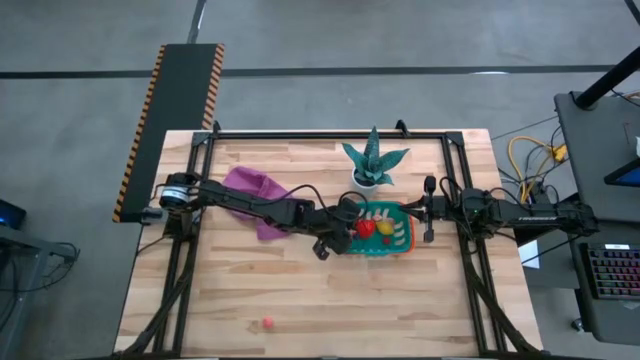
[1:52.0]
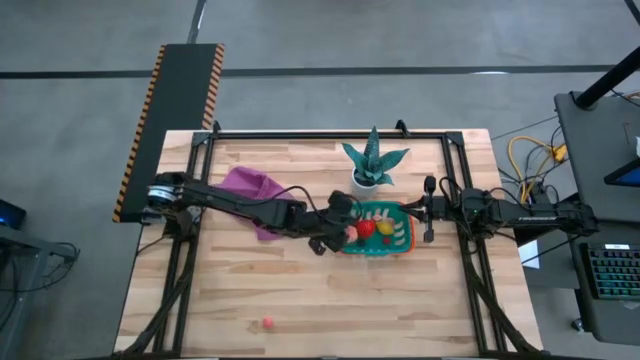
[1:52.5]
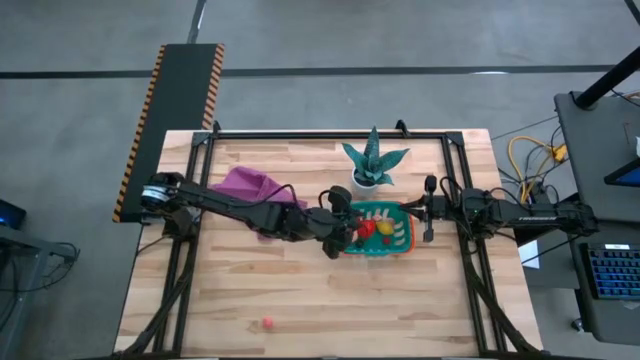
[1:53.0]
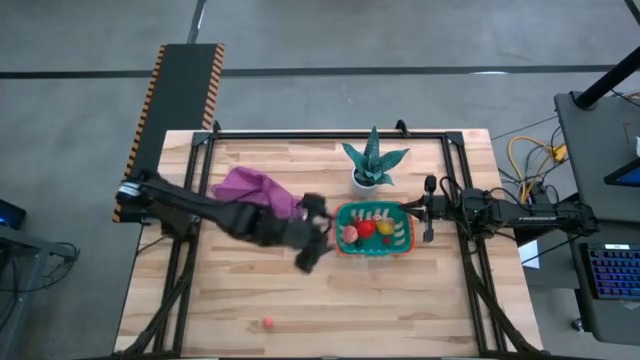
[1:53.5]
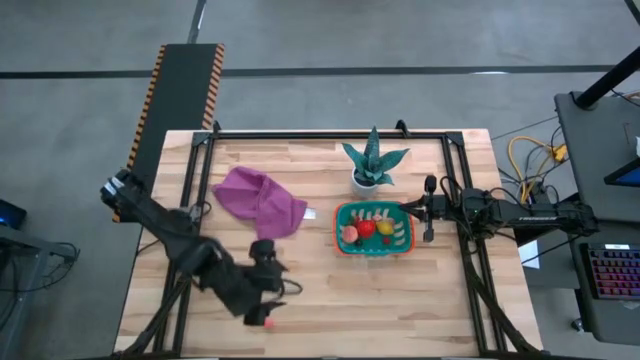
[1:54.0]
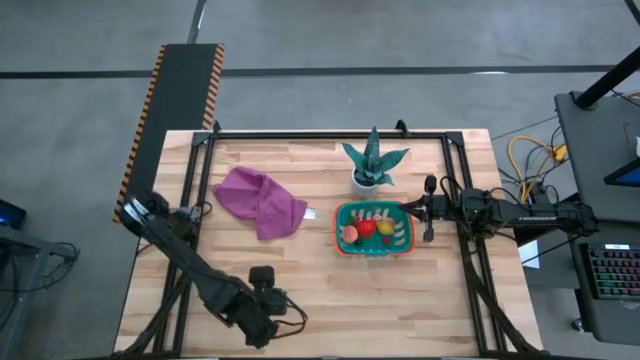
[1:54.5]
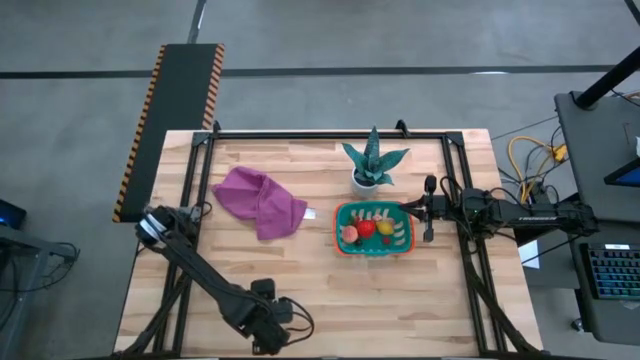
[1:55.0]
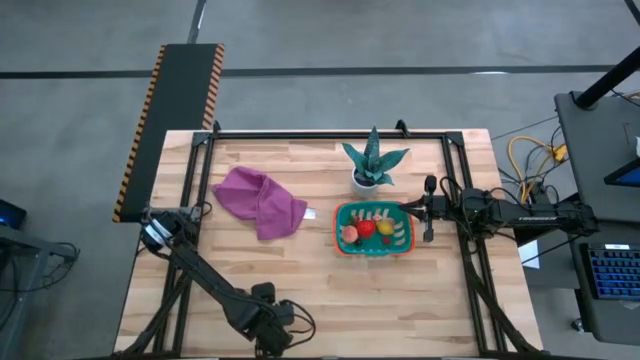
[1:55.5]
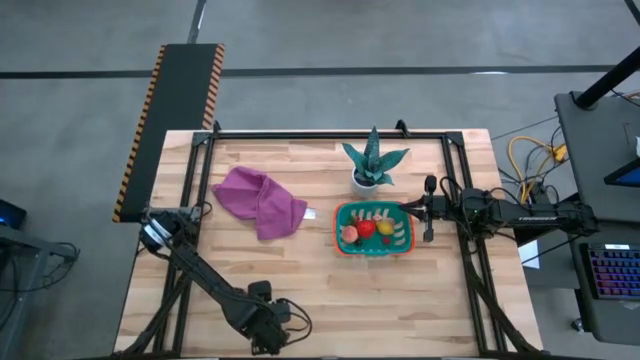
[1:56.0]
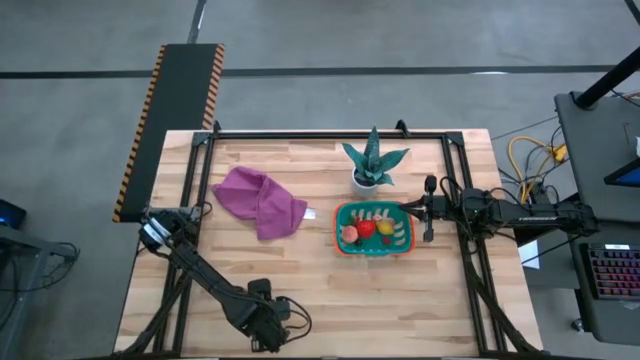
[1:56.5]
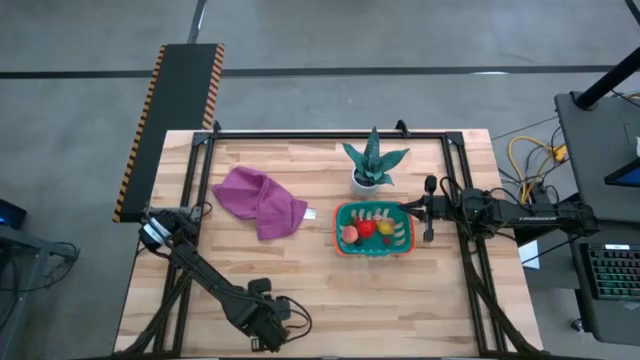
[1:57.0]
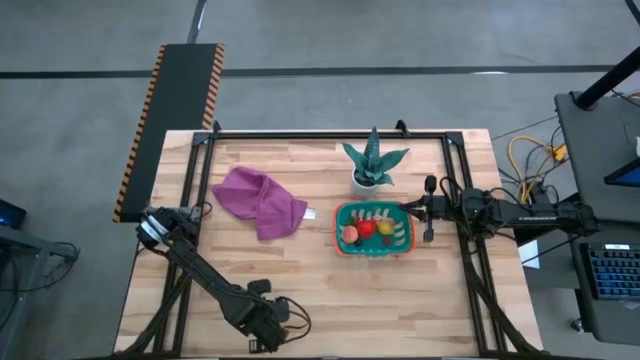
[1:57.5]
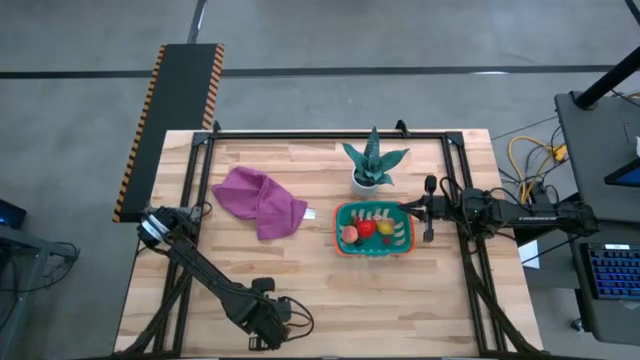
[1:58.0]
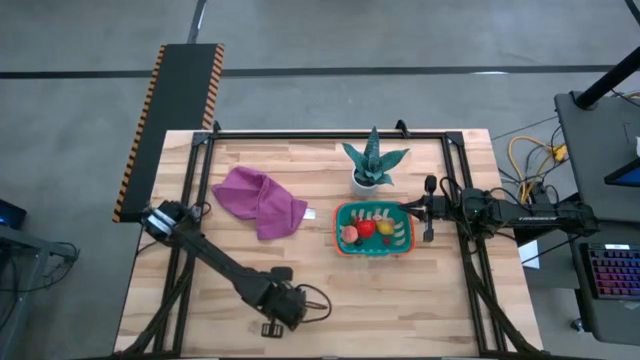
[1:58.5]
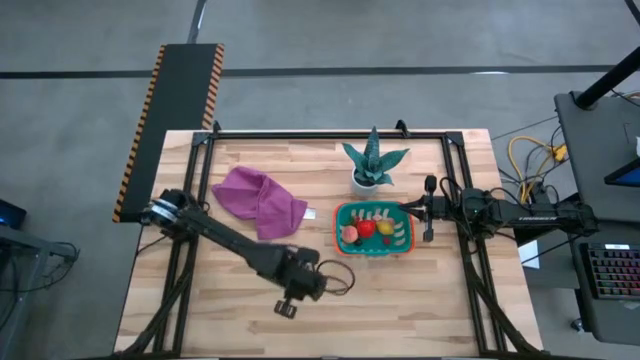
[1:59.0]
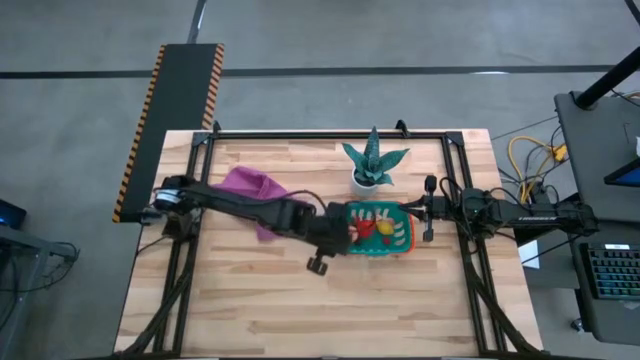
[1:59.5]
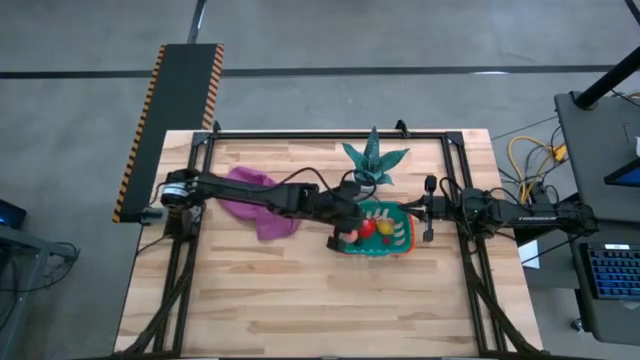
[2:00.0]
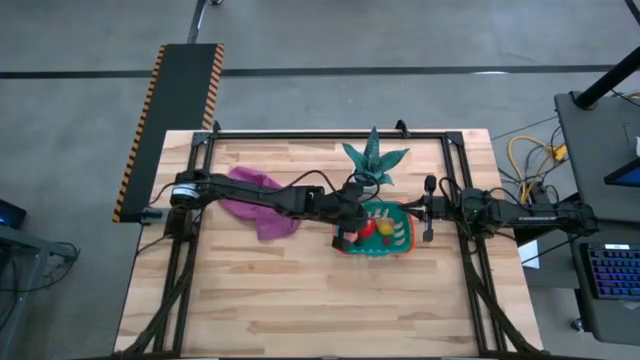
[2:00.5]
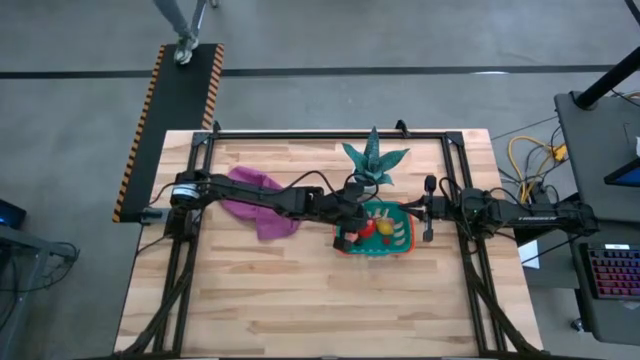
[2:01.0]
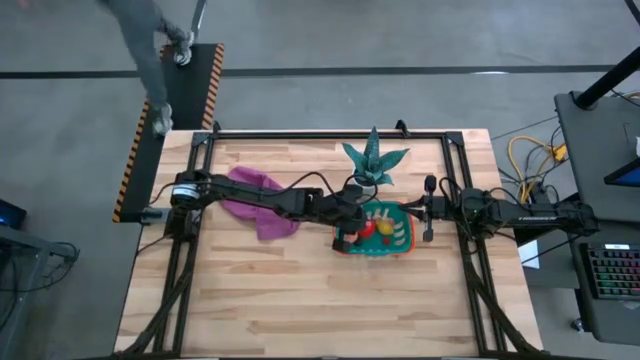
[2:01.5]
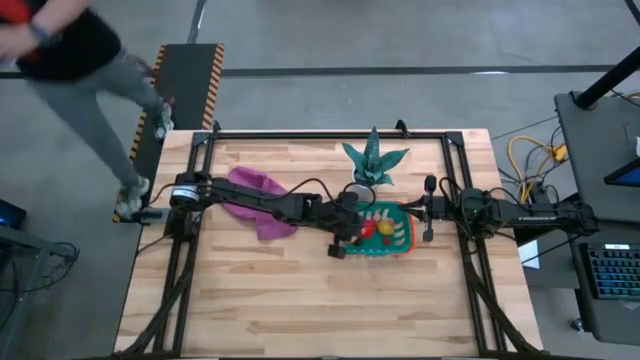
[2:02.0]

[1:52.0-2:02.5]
Task: Pick and placing Produce into tupperware
Put the apricot into the green basket

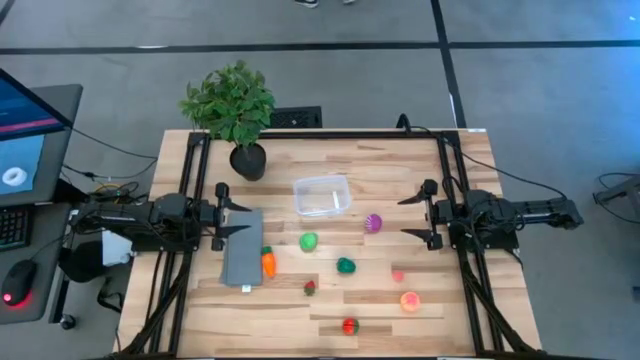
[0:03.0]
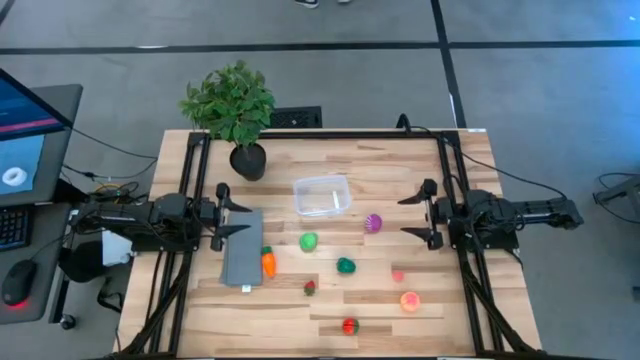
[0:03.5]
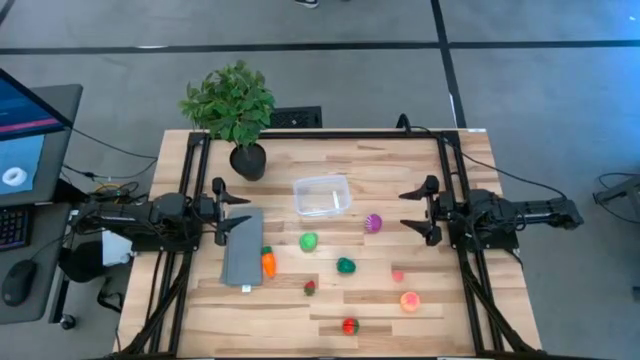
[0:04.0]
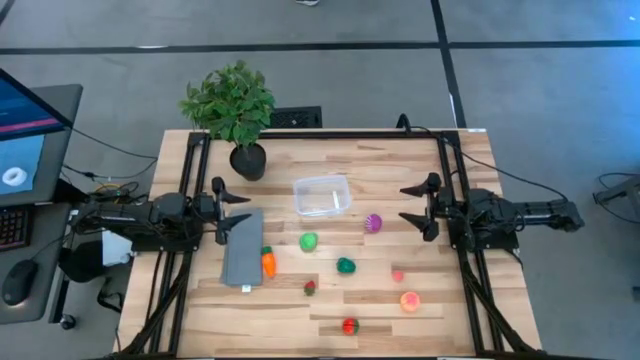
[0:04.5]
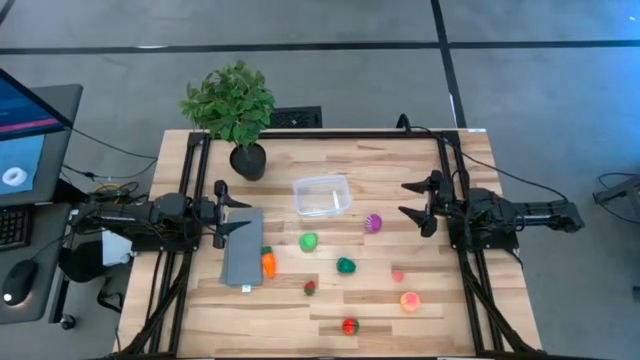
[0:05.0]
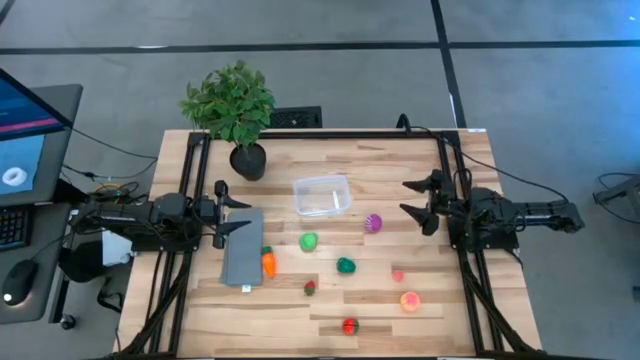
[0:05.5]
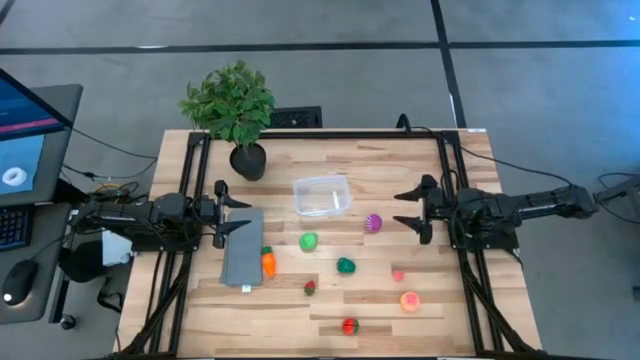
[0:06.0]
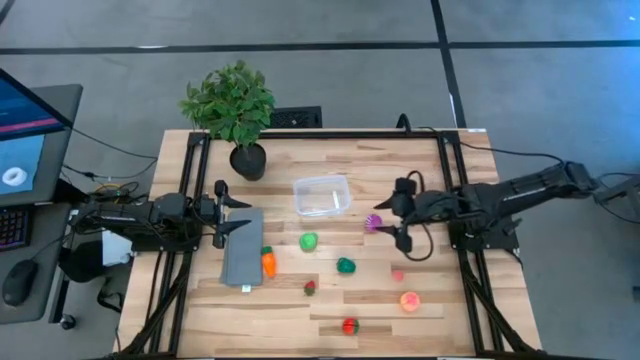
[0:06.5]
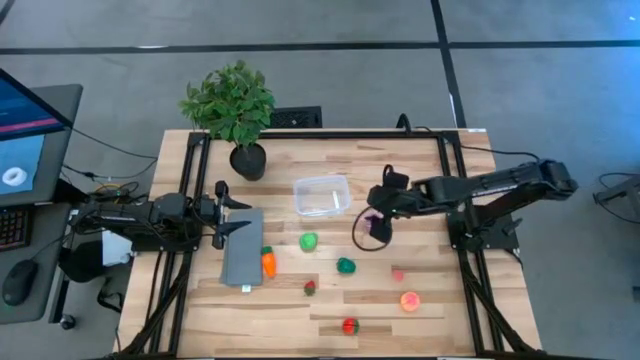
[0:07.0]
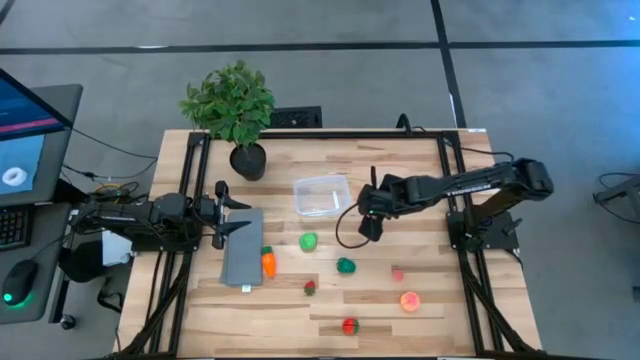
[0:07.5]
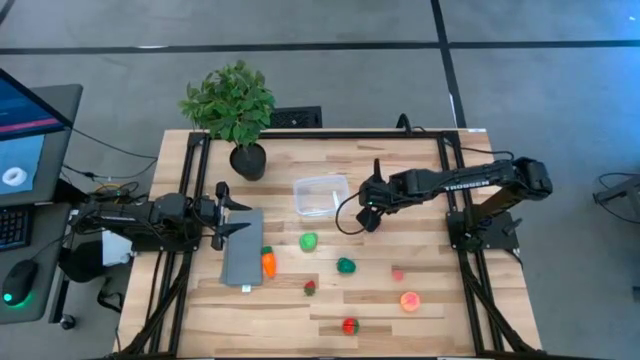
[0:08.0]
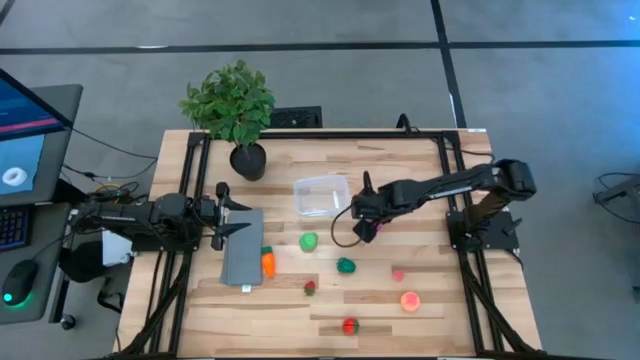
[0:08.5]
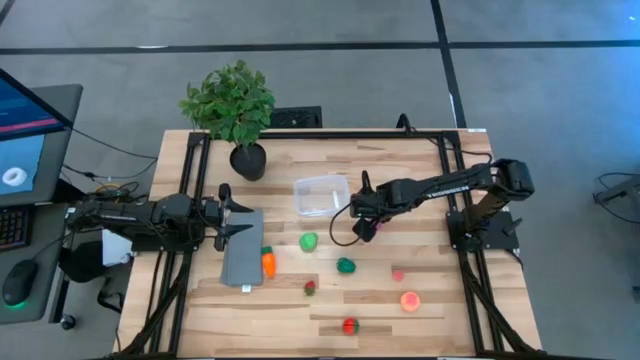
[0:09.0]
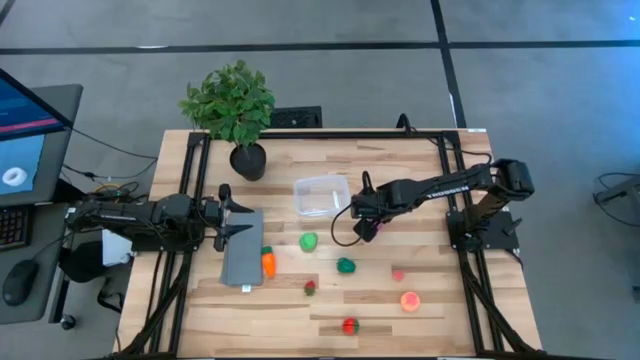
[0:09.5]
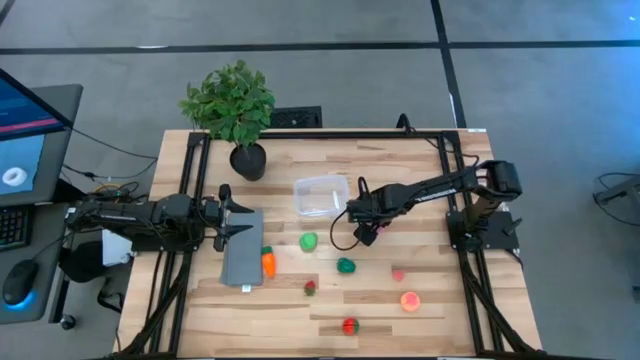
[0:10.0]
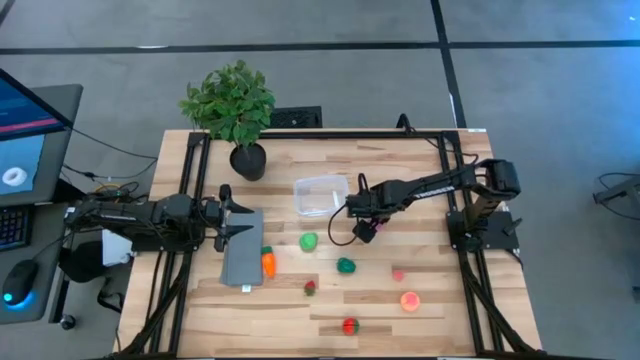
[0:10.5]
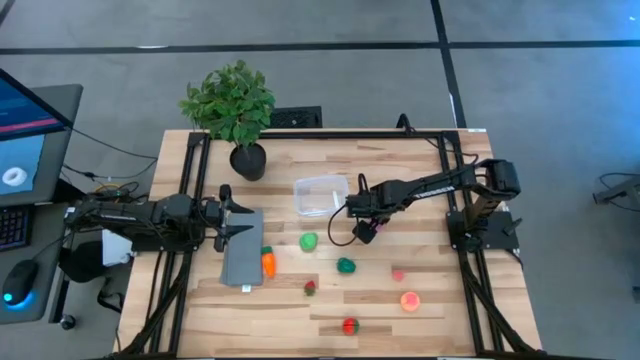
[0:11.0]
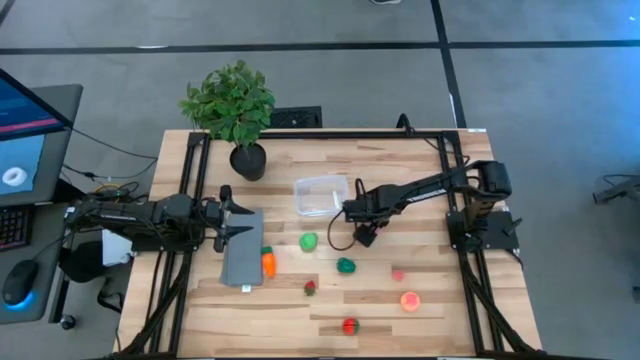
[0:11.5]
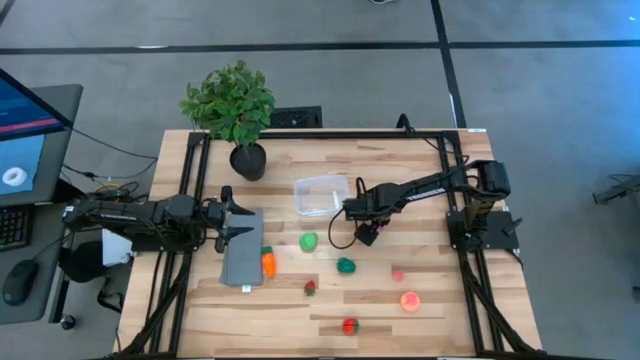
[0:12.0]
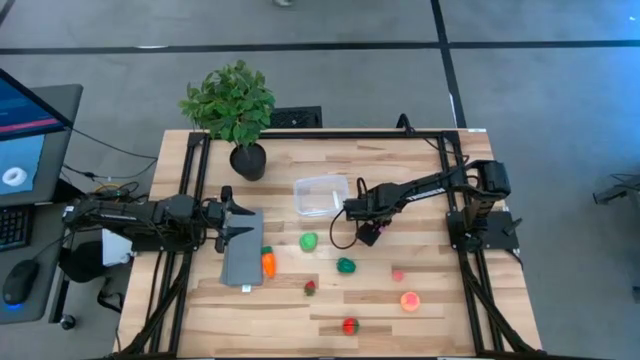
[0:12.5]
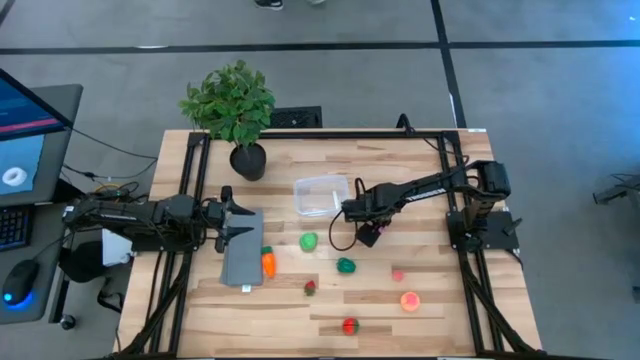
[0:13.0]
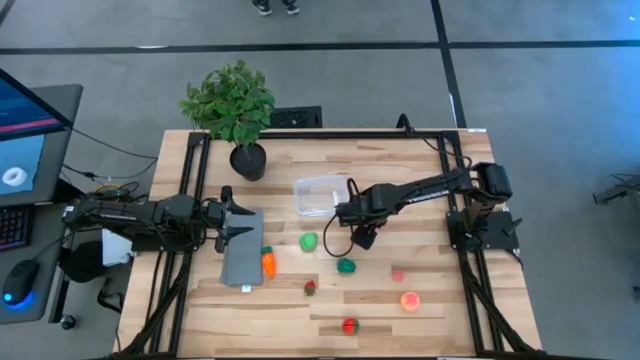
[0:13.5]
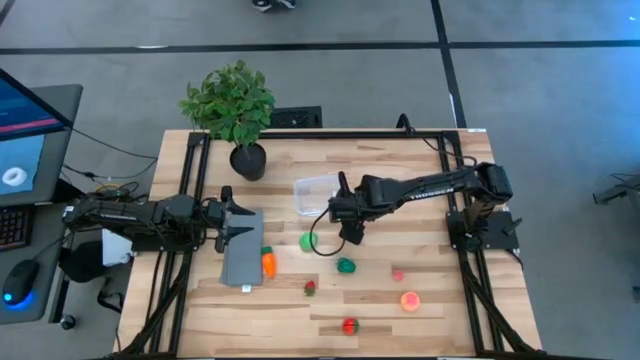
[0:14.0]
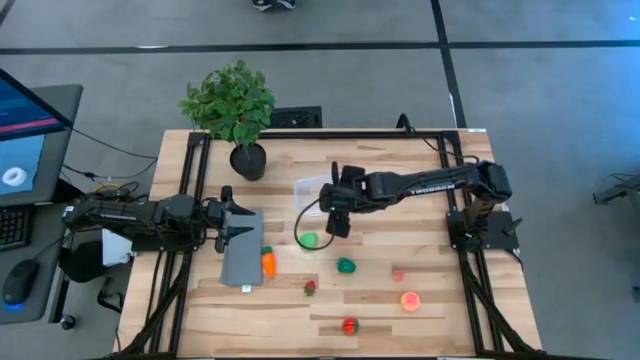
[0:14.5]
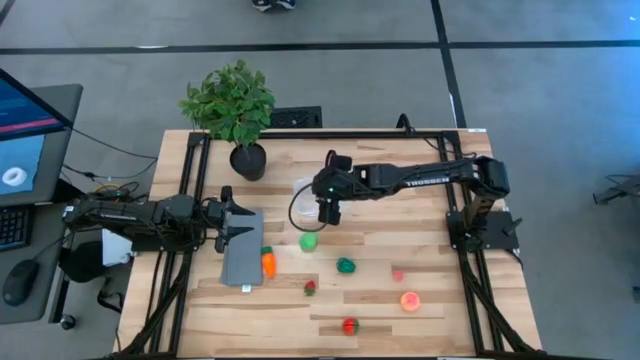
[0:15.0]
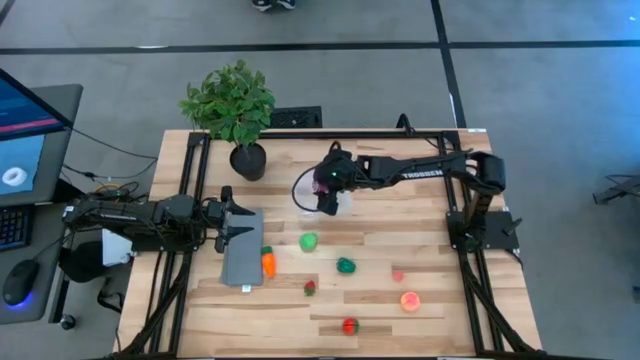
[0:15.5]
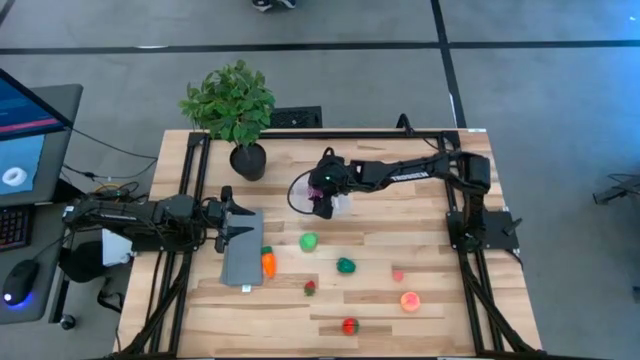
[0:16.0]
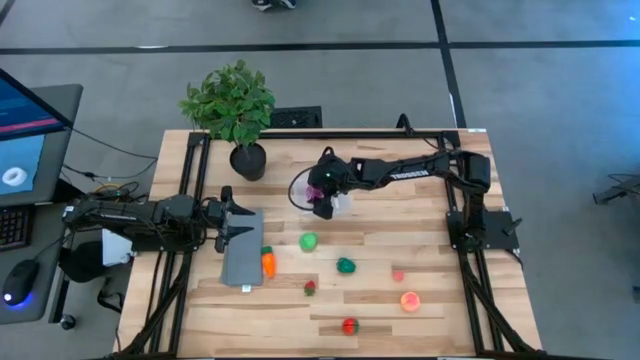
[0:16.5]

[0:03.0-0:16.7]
Task: Pick and placing Produce into tupperware
Put the onion into the transparent container
